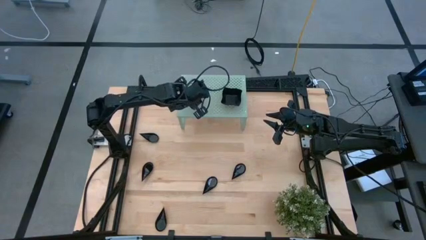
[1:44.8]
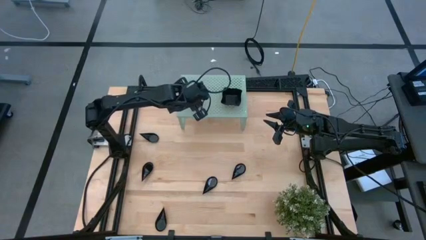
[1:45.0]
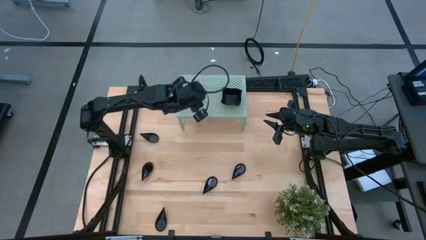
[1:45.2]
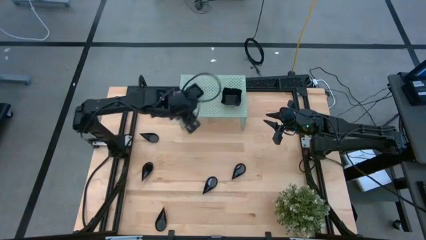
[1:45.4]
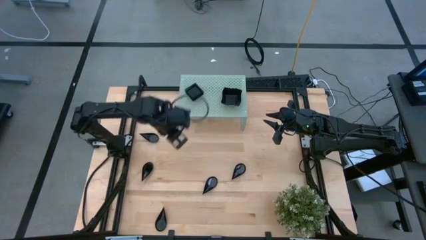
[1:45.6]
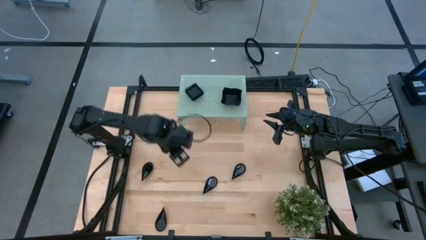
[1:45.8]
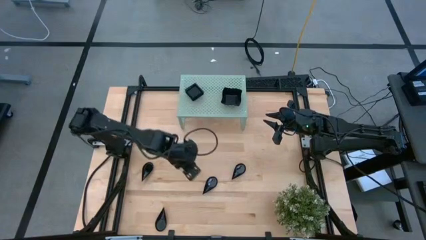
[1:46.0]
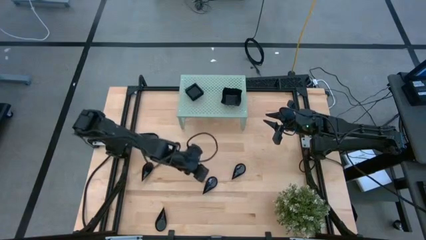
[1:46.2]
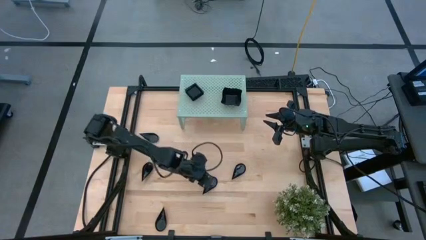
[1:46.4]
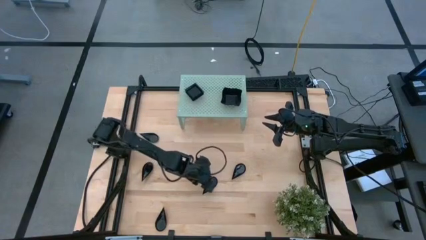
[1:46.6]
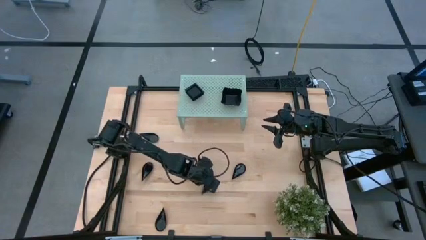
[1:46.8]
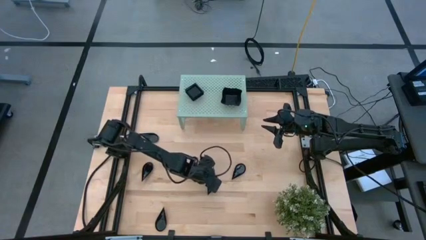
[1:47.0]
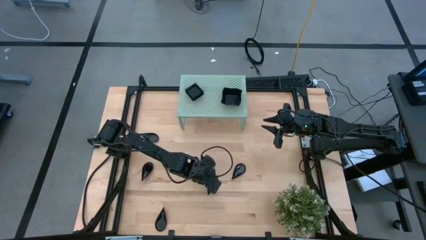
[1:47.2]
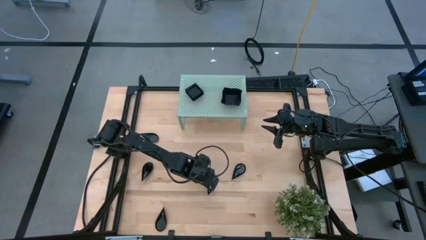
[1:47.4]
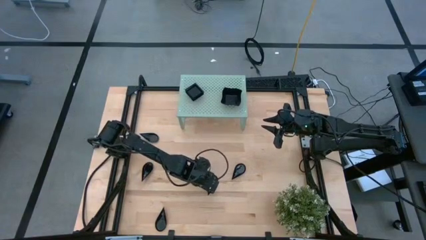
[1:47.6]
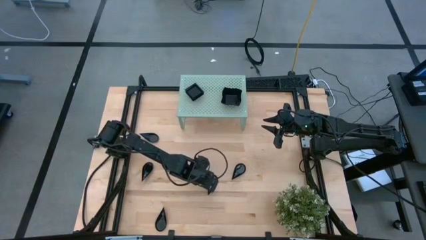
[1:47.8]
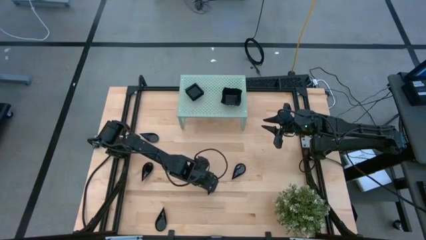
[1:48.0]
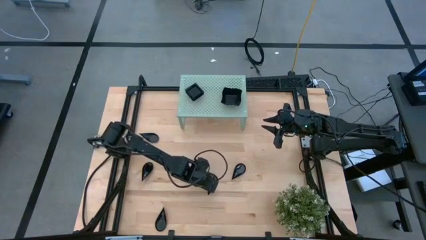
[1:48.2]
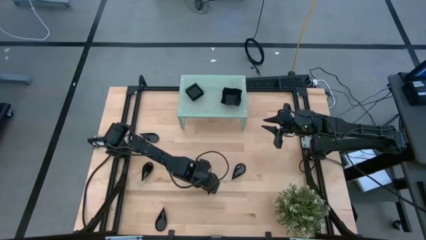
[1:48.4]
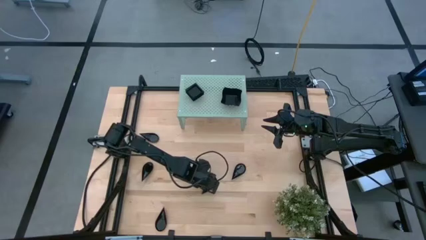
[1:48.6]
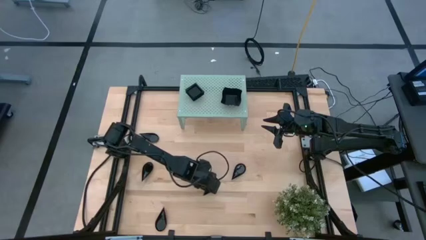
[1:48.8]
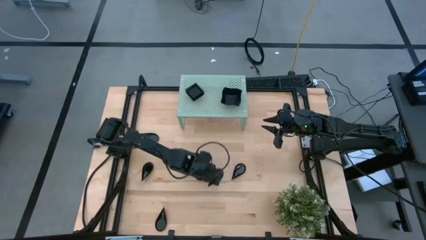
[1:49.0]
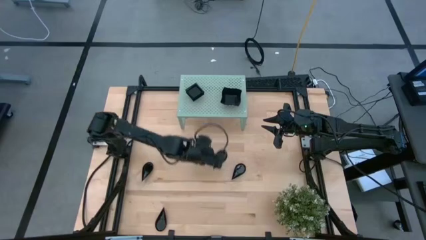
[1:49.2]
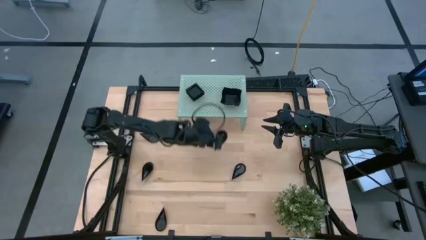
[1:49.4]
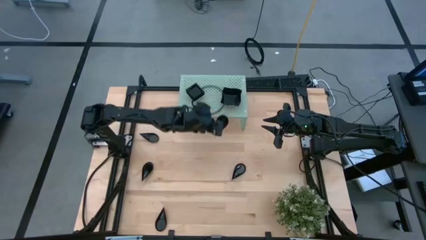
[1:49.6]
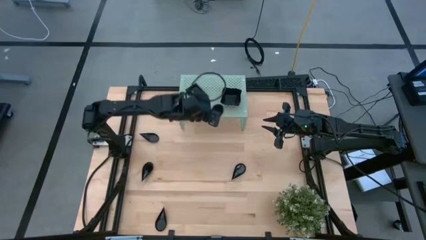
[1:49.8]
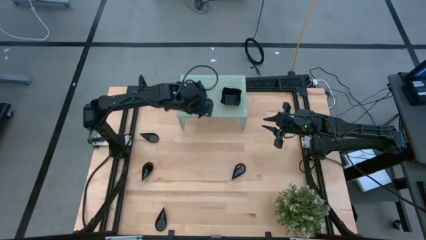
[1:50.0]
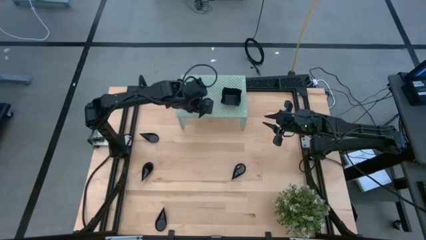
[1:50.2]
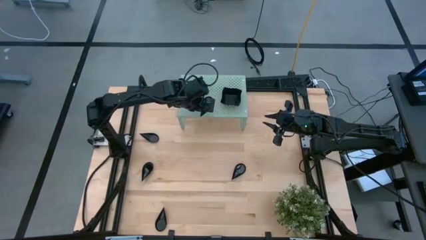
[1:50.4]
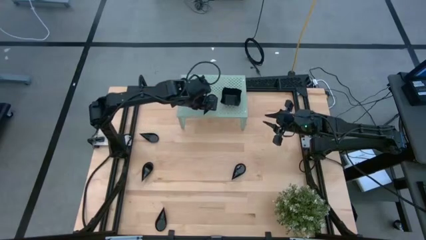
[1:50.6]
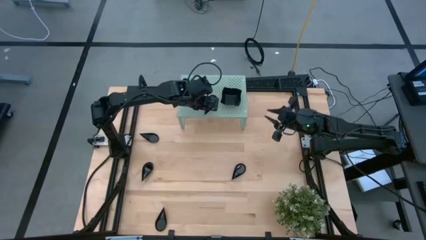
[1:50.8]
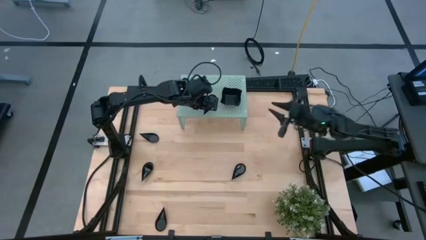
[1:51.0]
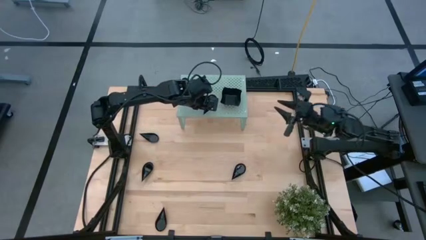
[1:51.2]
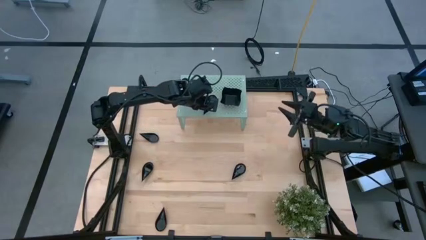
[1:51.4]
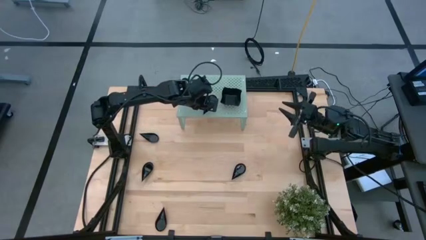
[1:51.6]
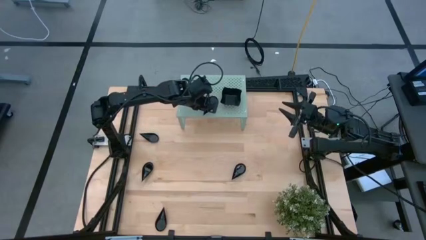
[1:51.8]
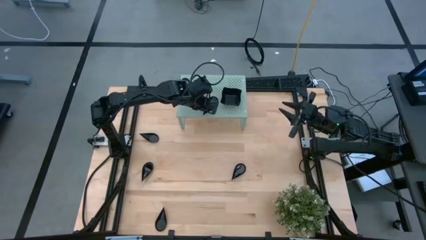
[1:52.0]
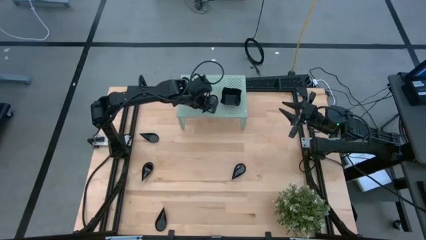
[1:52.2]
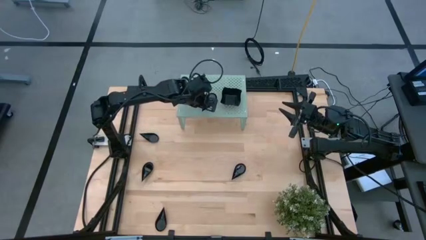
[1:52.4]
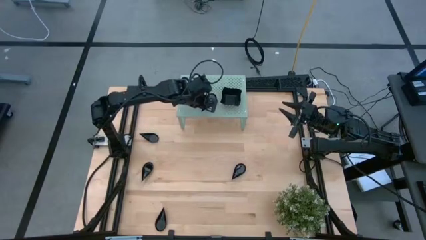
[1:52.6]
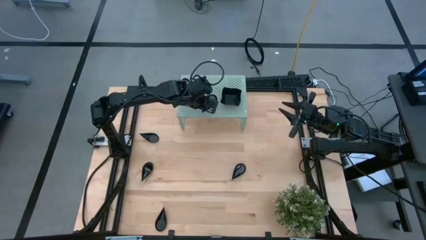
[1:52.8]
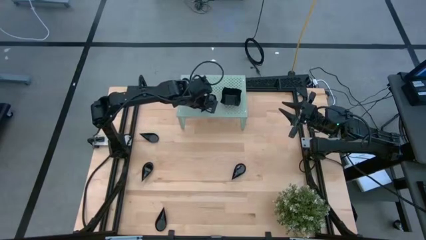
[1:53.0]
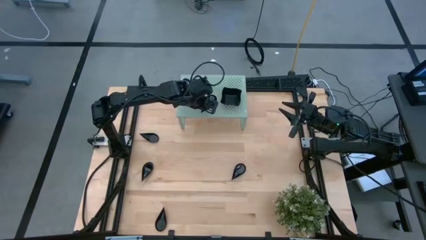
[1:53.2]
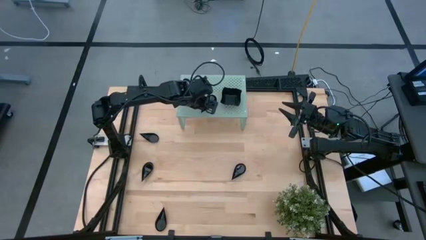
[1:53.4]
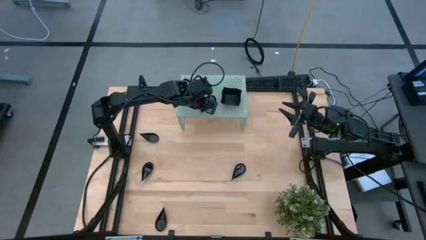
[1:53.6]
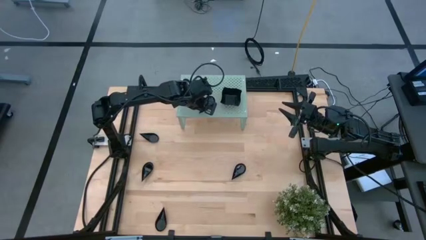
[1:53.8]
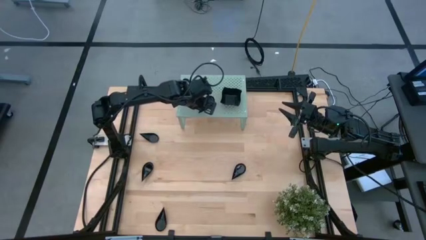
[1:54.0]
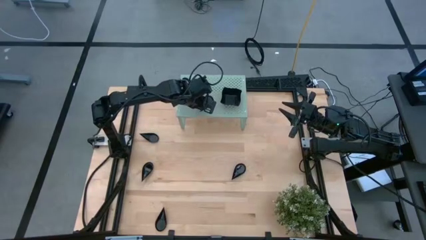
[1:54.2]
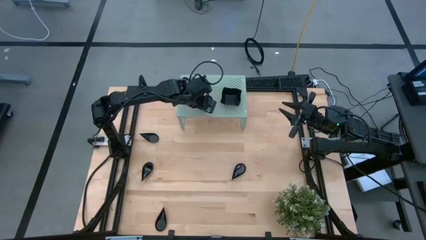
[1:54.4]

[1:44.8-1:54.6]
Task: Pick & Place Mini shaped plates
Put the black drop shaped plate on the shelf

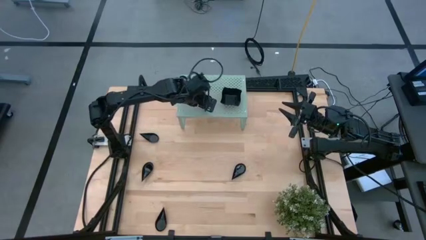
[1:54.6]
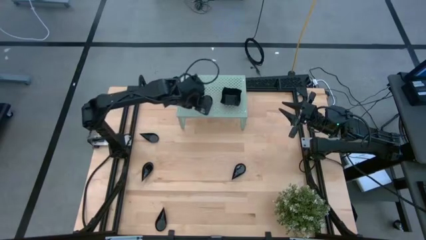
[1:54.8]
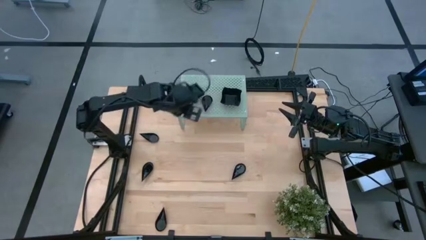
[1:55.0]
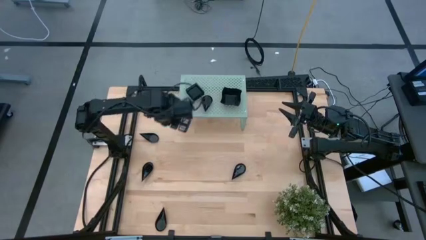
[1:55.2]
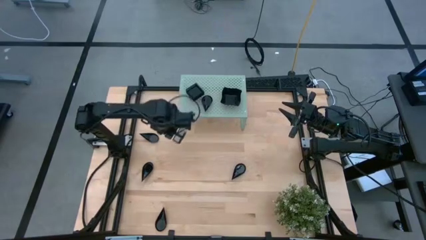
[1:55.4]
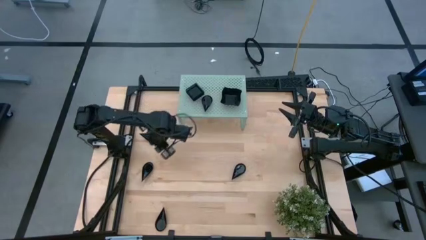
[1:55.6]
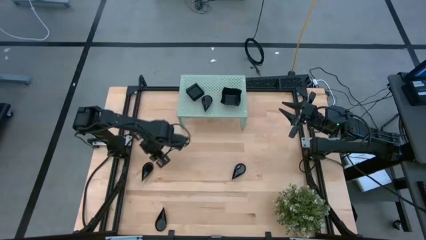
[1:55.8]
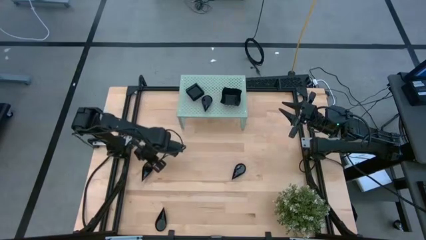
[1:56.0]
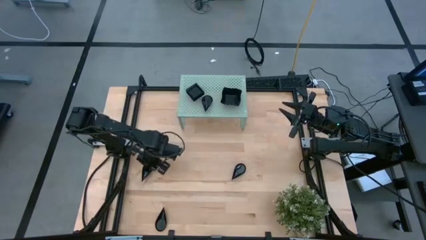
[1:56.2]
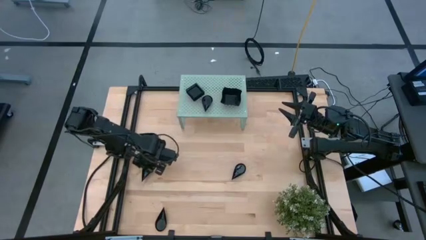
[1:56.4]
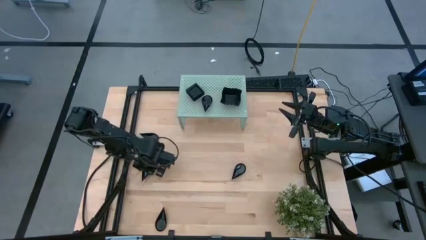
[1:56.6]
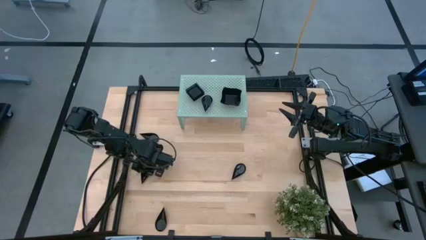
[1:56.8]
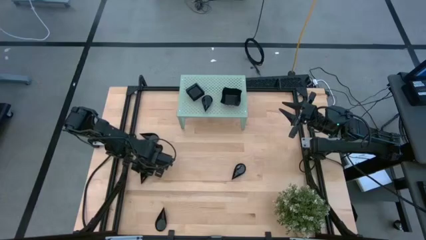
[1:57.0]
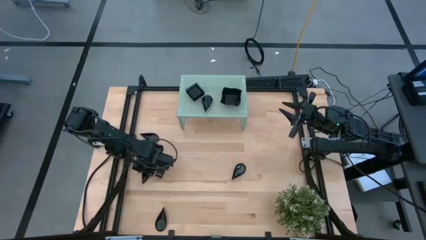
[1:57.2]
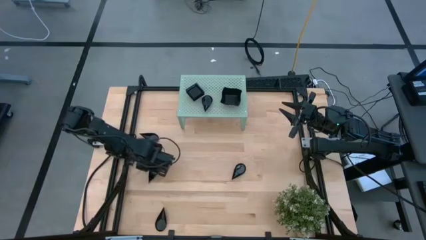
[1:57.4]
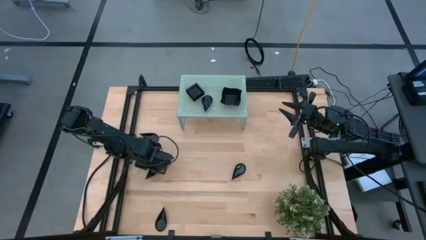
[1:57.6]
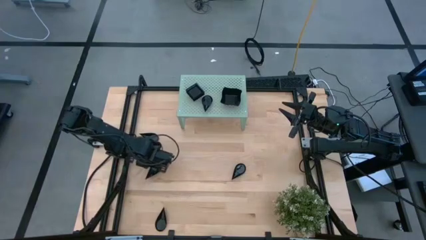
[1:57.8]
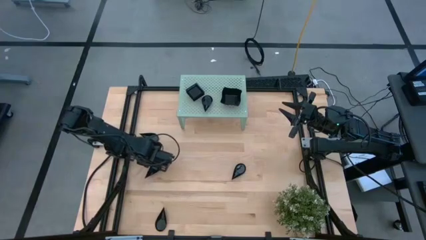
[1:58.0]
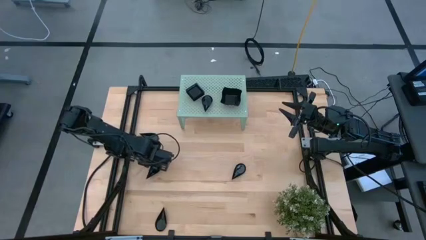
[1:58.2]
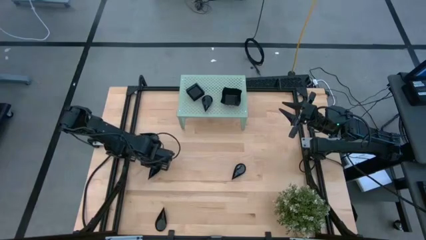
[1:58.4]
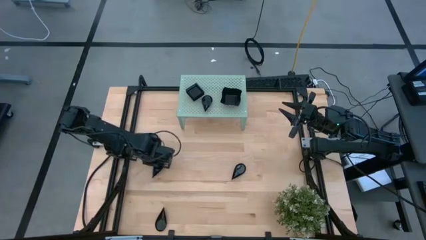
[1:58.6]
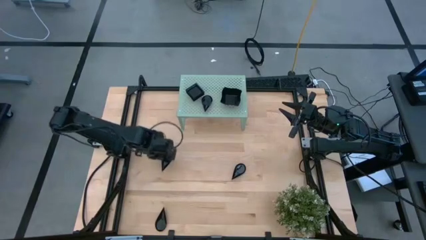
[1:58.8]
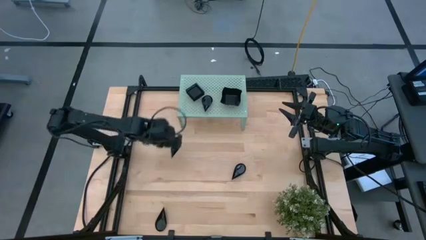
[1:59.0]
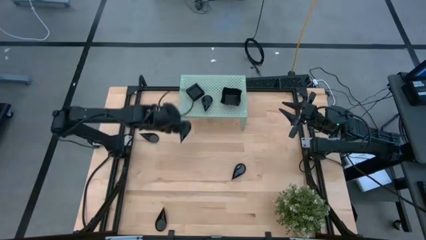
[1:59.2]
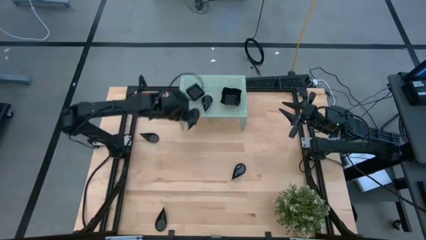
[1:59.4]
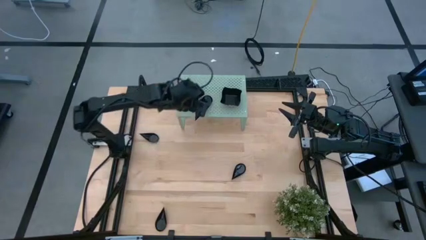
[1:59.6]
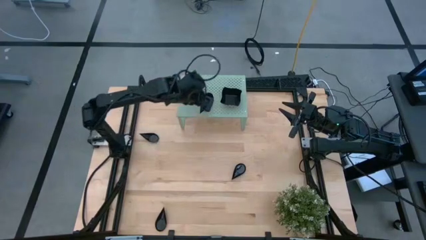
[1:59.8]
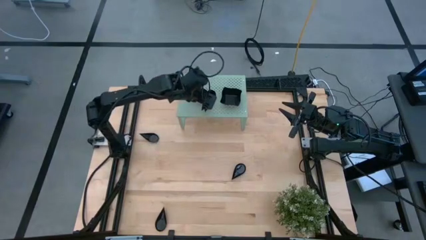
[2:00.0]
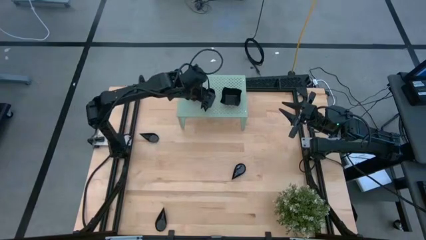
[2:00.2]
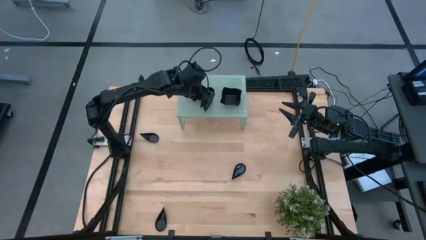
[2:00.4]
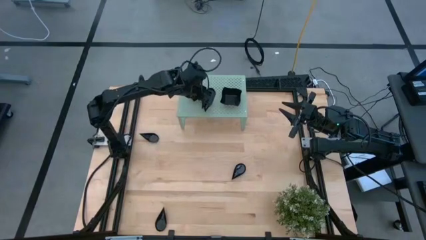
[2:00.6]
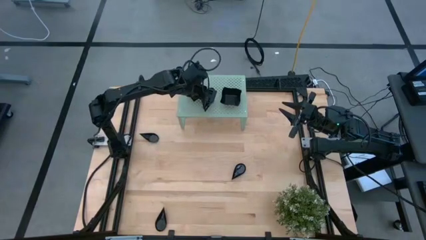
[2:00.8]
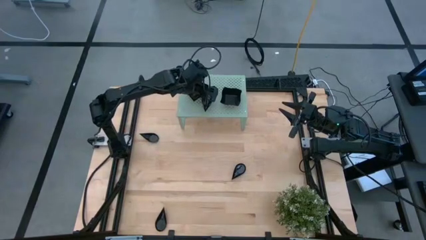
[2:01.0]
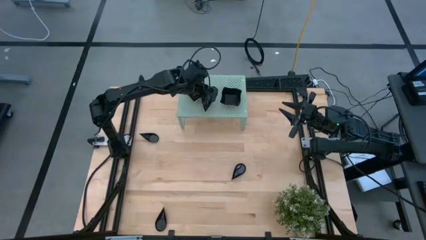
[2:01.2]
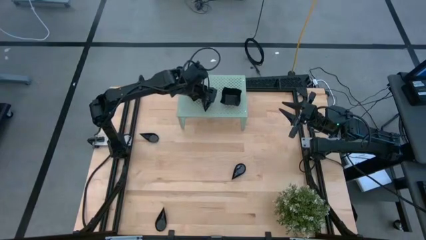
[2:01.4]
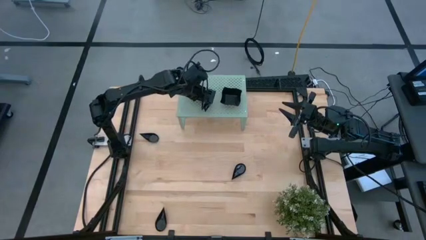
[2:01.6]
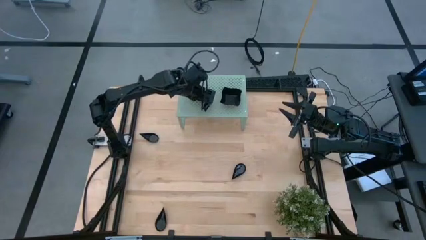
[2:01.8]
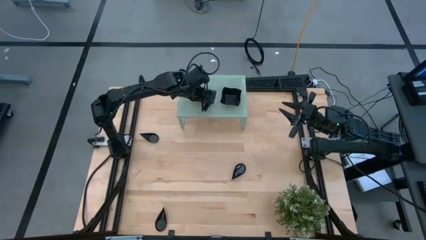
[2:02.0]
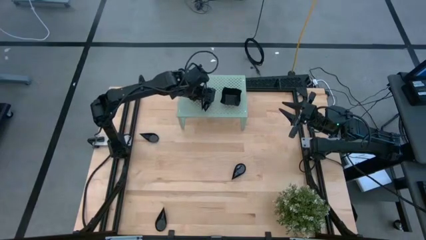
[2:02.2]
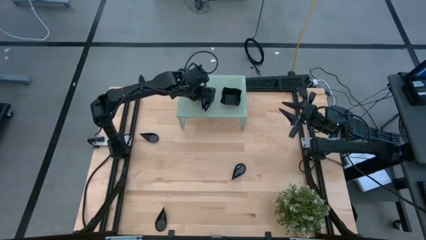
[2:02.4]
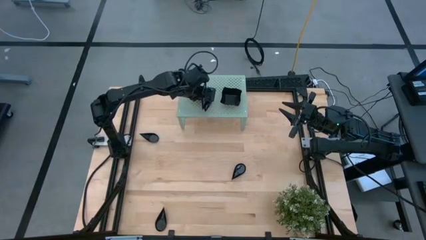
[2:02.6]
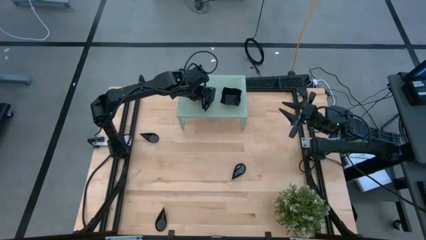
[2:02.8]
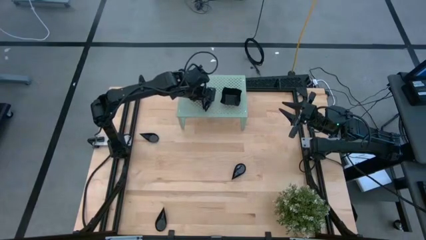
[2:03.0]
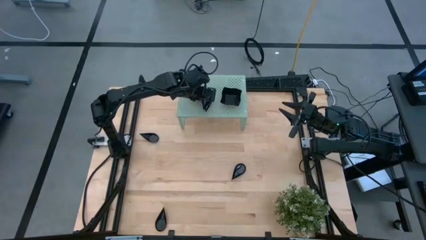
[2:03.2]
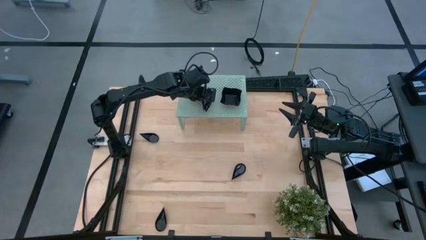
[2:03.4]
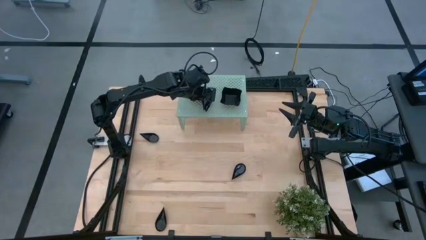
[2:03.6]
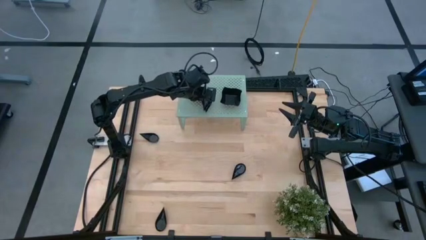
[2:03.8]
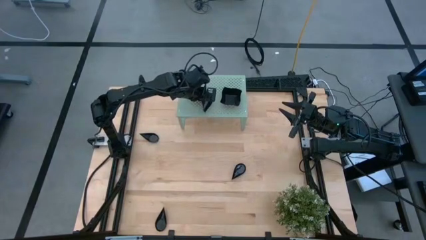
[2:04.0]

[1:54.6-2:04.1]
Stack the black drop shaped plate on top of the other black drop shaped plate on the shelf
